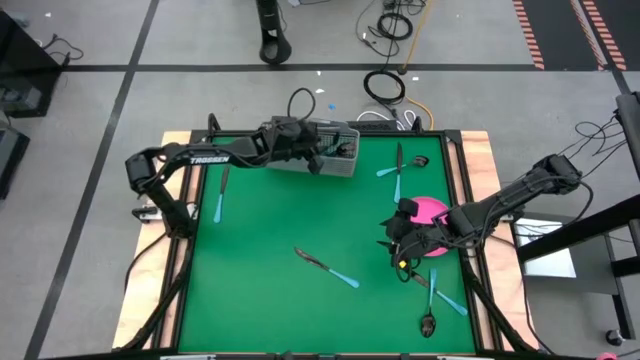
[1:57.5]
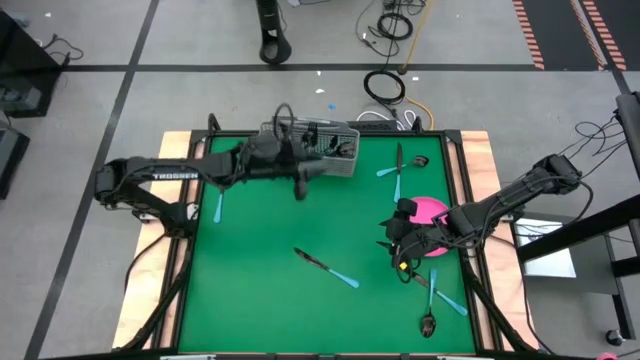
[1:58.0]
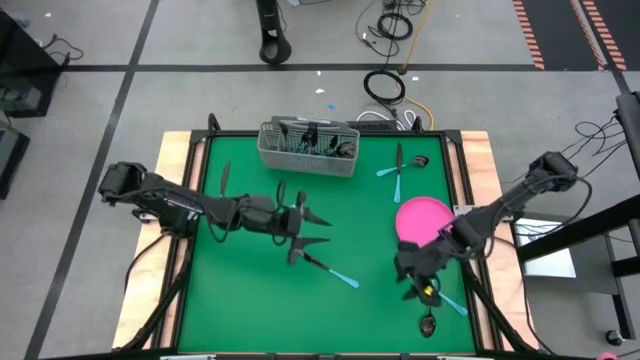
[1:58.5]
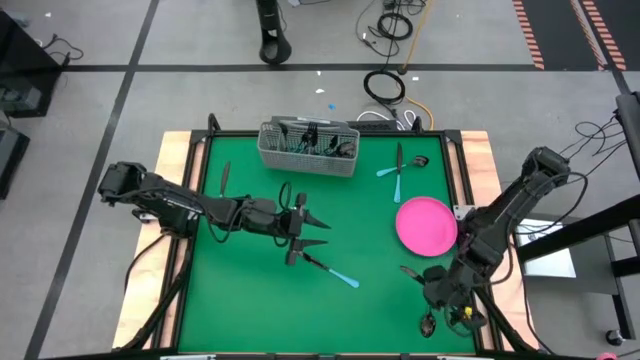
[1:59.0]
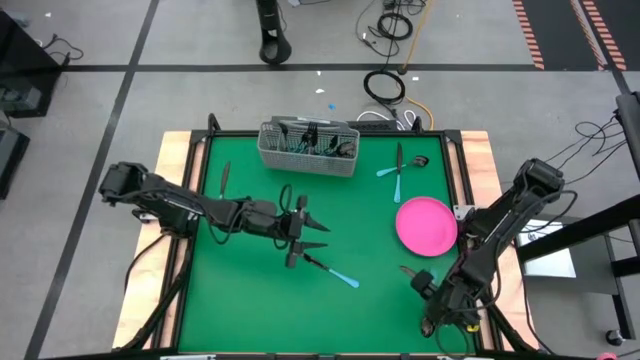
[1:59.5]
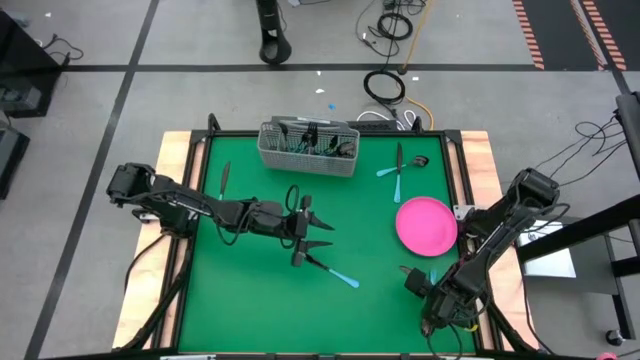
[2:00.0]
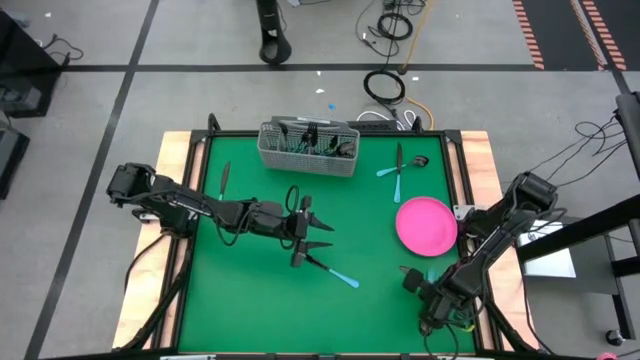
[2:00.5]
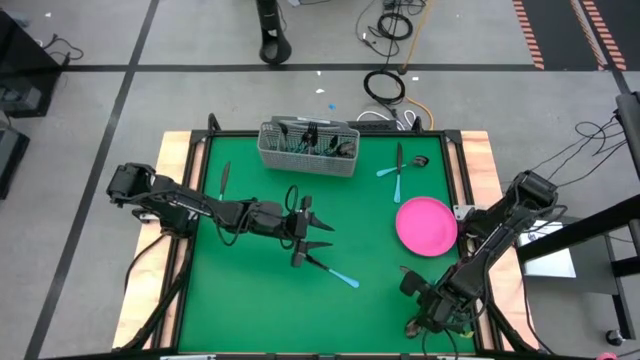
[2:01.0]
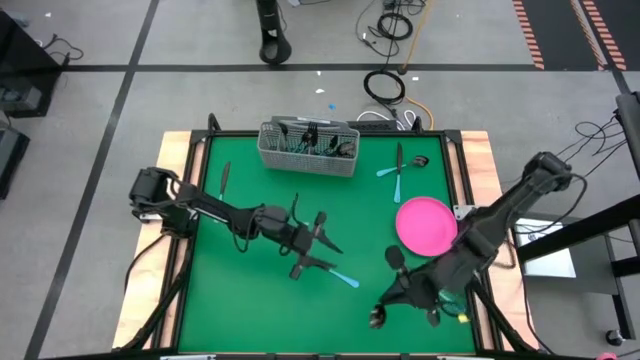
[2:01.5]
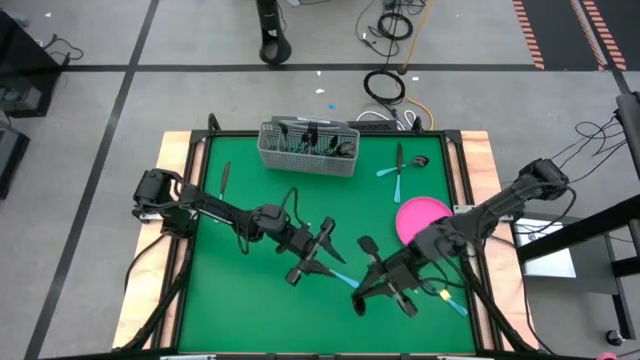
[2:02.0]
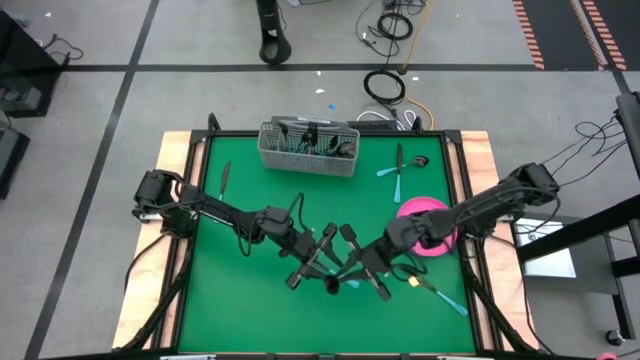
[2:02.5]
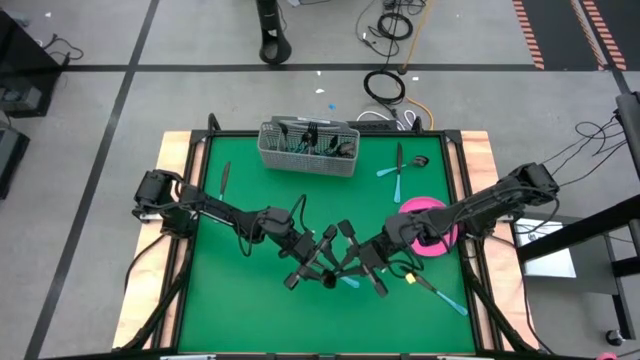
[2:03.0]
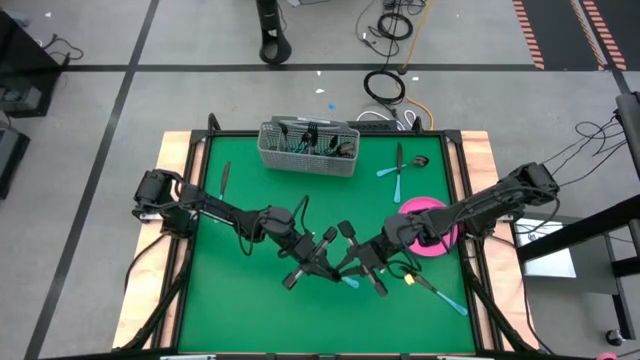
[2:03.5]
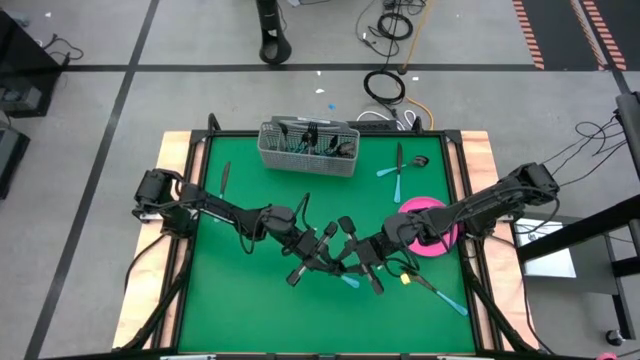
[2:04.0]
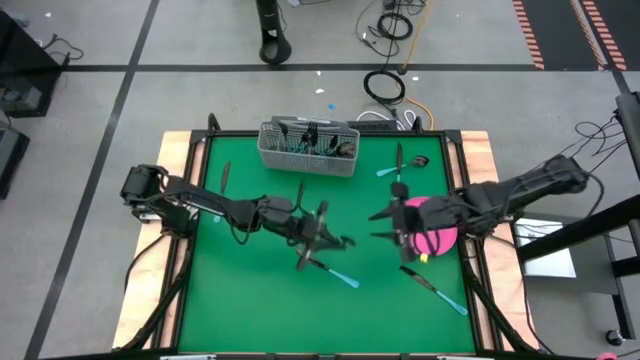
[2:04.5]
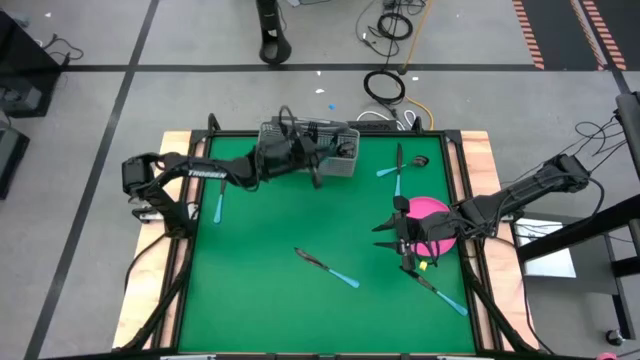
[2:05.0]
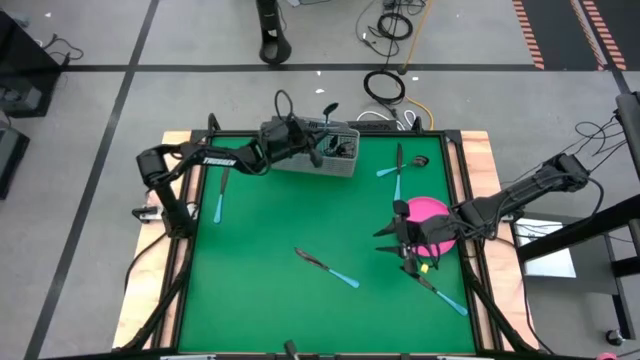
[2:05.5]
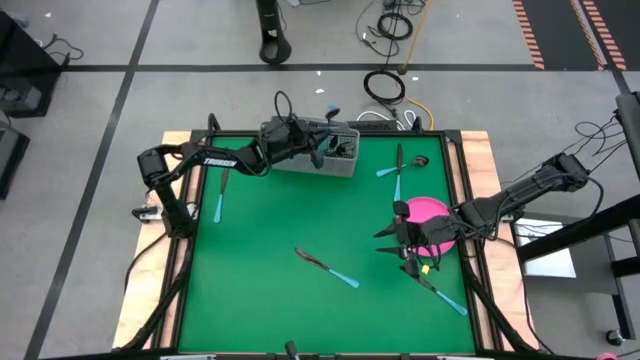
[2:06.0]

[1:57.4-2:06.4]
Task: Sort silverware
Put the blue spoon into the silverware tray with the other blue spoons

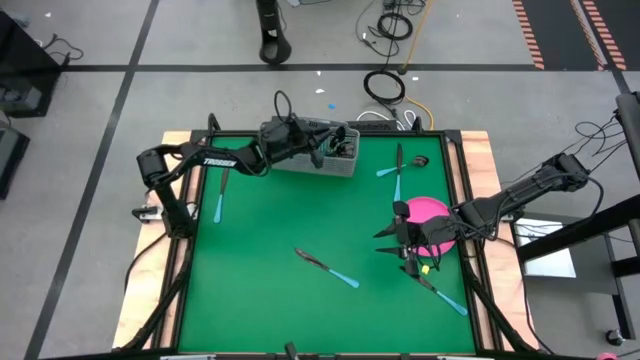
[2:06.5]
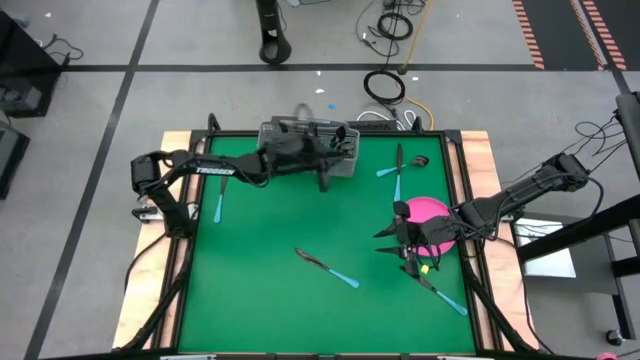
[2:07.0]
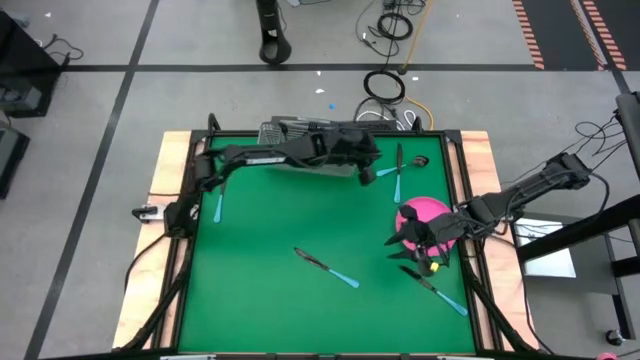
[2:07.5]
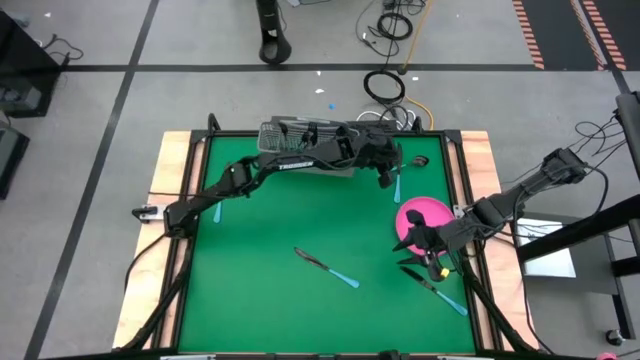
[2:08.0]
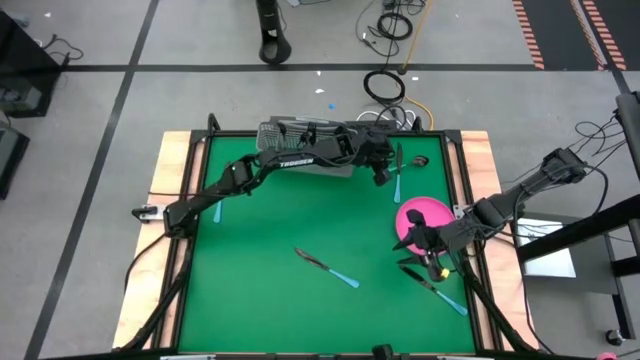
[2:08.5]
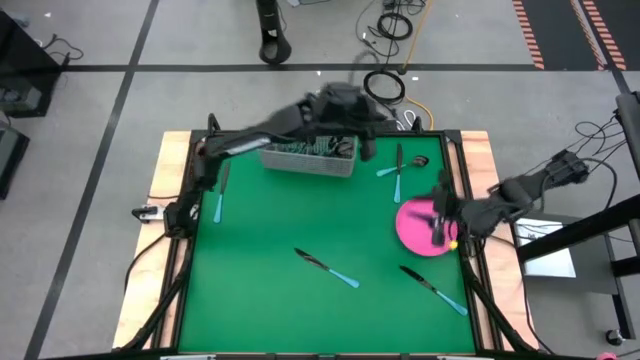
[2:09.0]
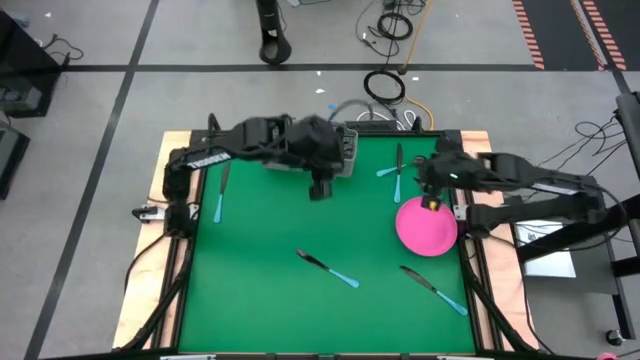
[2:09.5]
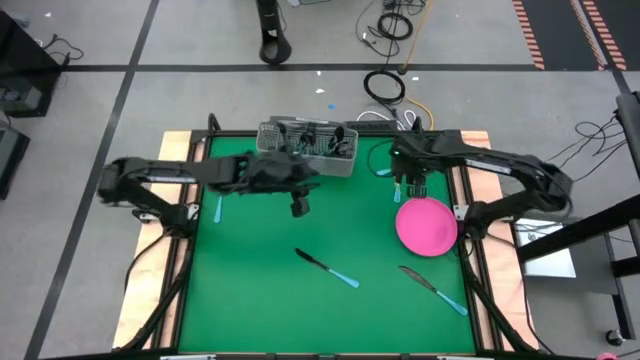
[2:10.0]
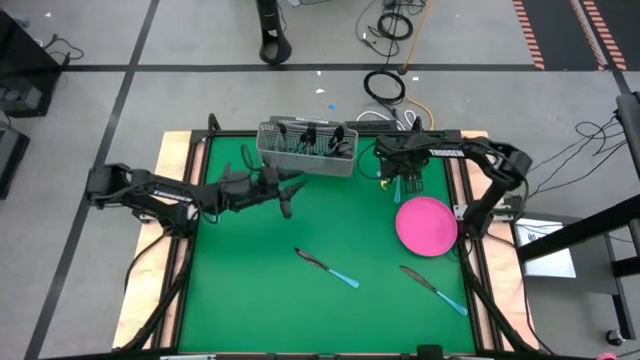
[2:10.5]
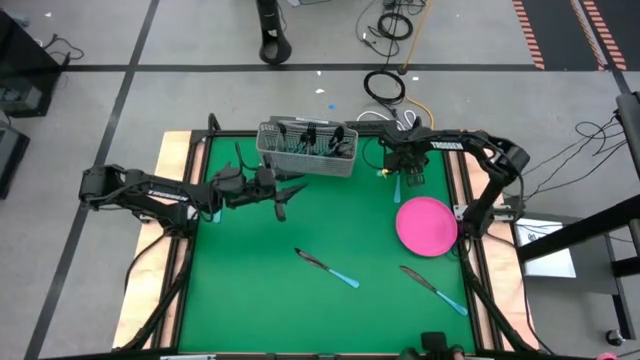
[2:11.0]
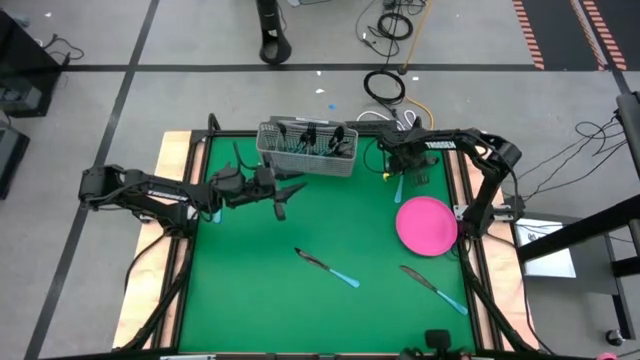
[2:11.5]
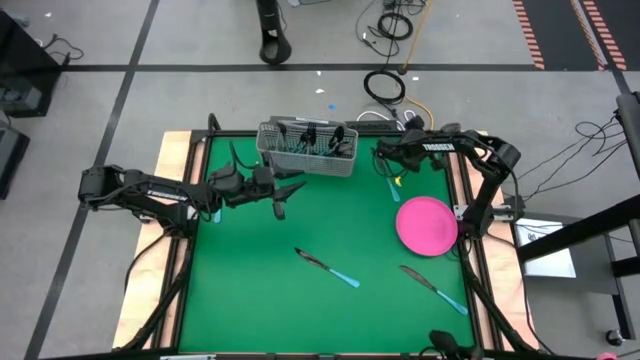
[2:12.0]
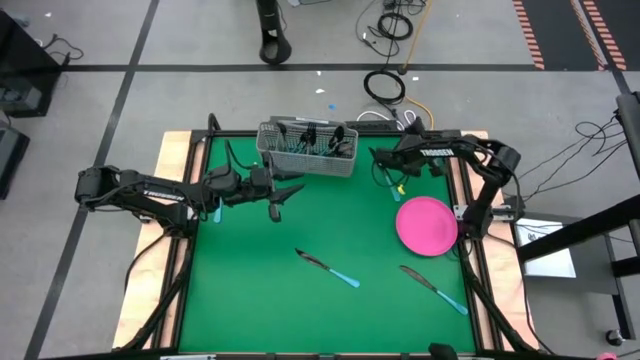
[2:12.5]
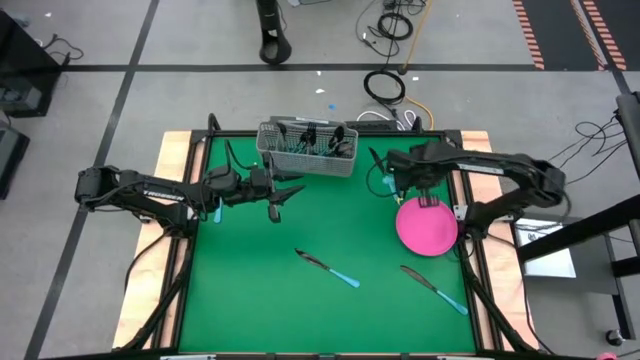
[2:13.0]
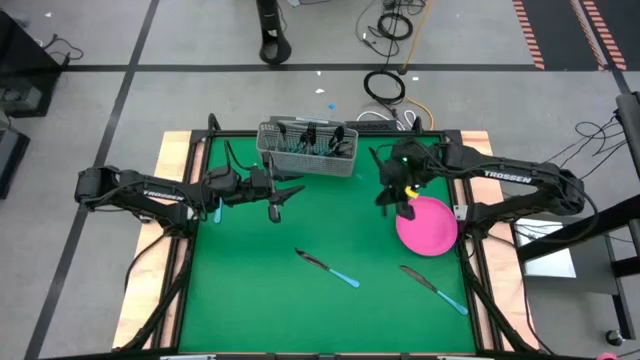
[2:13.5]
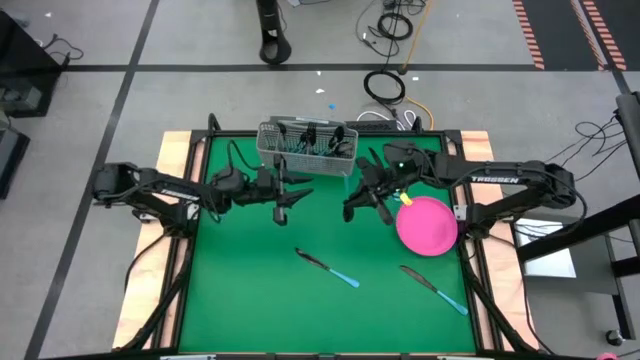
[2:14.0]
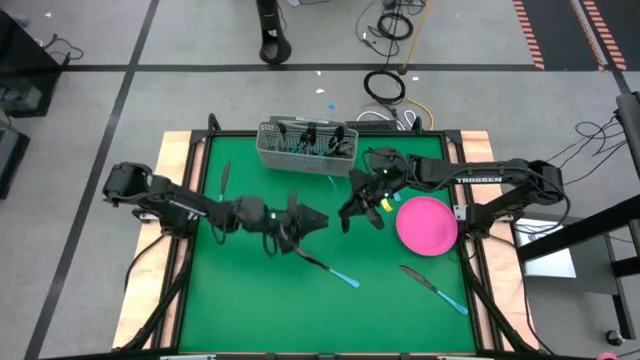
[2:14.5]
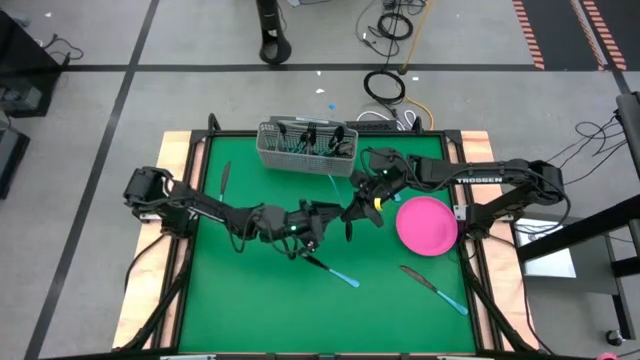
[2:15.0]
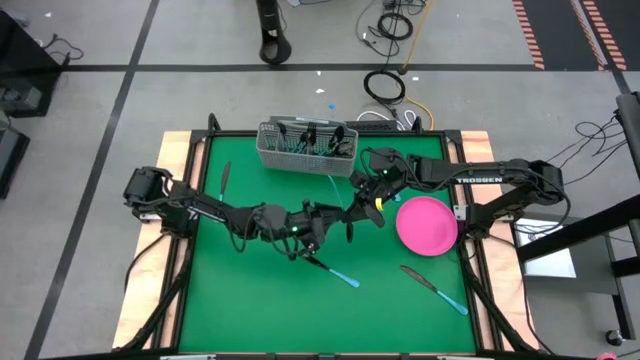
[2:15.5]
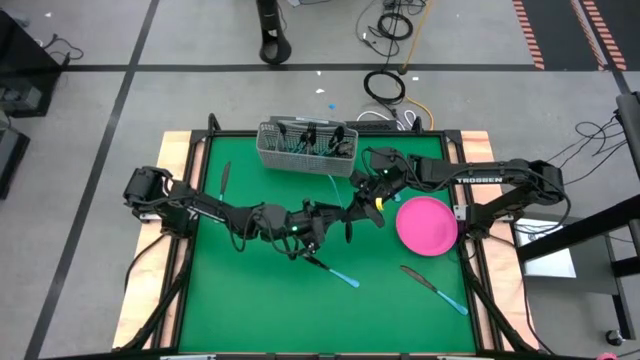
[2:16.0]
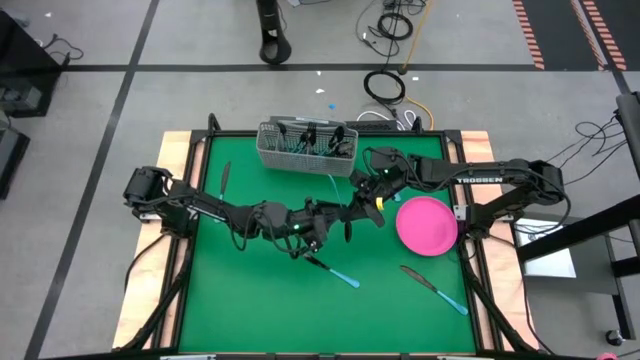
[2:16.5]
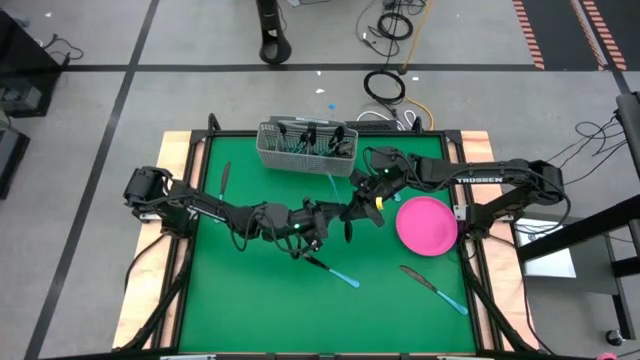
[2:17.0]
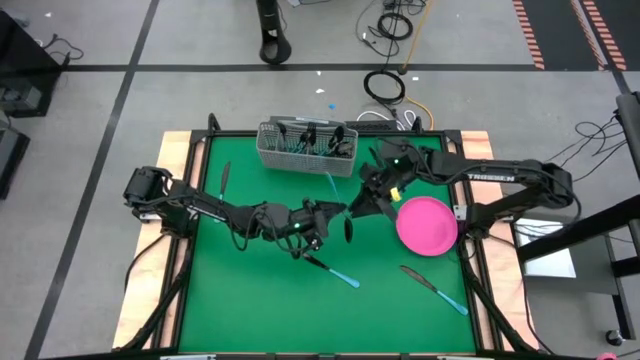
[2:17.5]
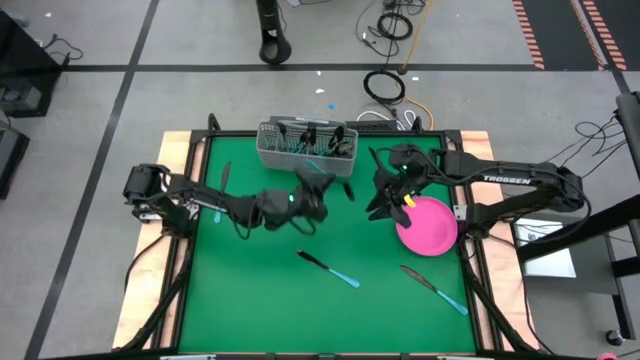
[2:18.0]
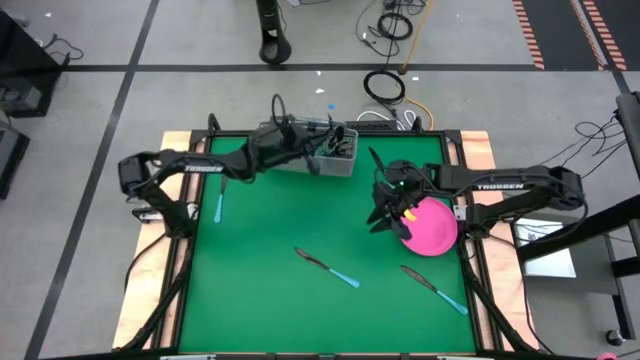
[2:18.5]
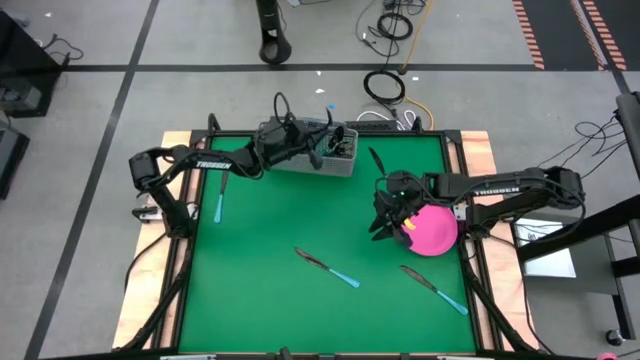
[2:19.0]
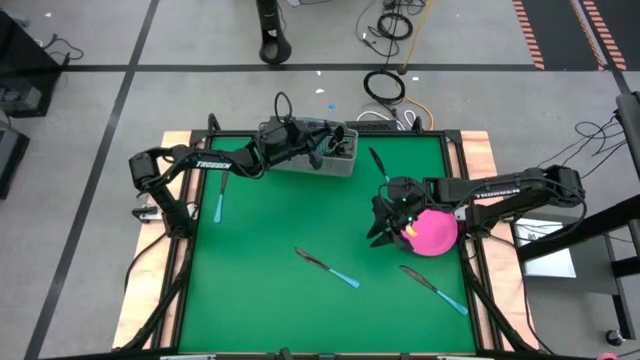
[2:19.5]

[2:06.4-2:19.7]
Put the blue spoon into the silverware tray with the other blue spoons

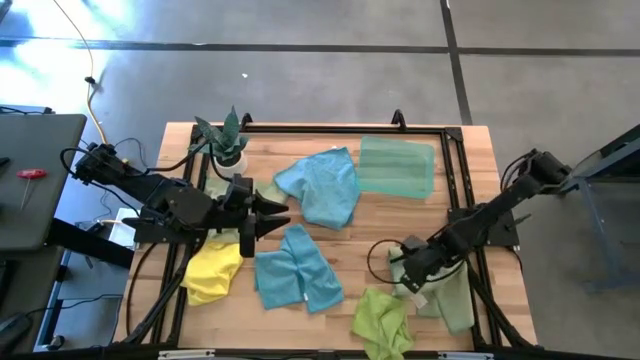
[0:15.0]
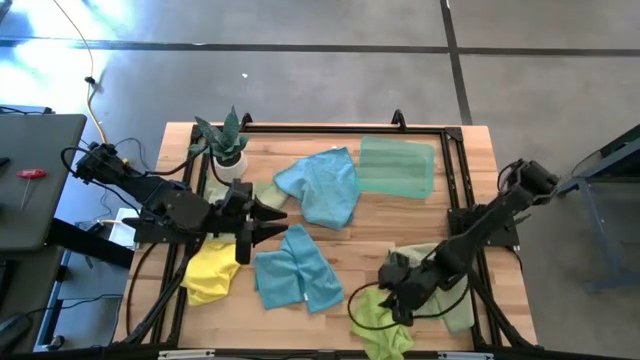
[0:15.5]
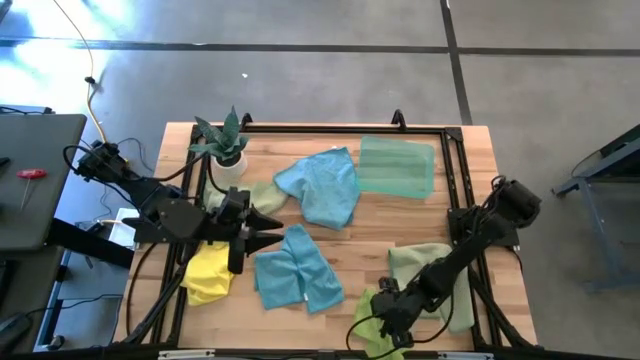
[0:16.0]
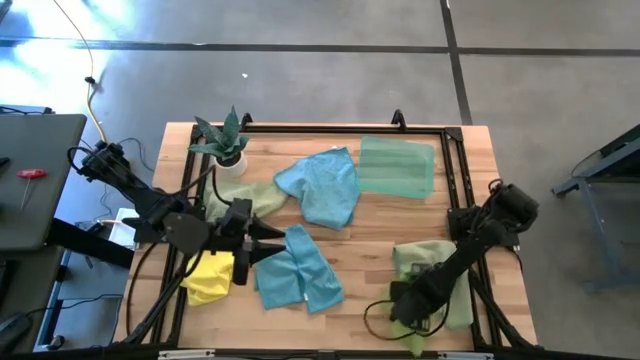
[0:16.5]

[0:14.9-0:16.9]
Task: Fold microfiber towels
Adjust the light green microfiber cloth
